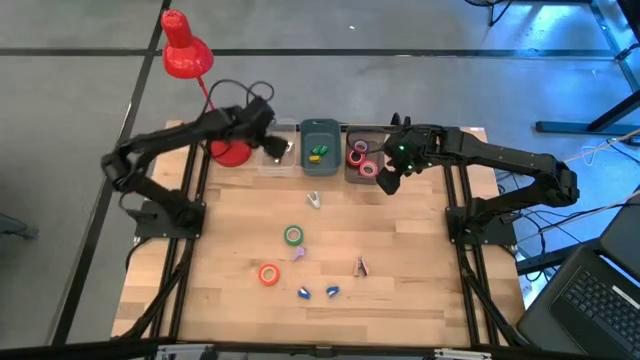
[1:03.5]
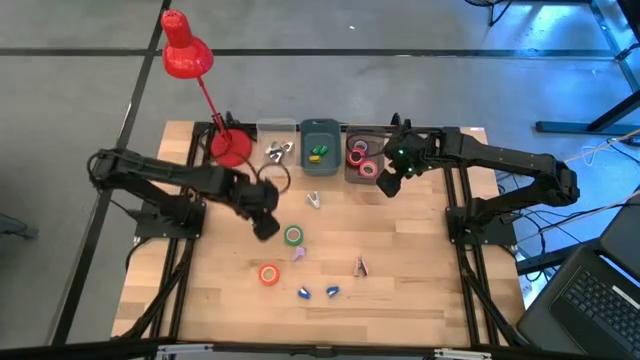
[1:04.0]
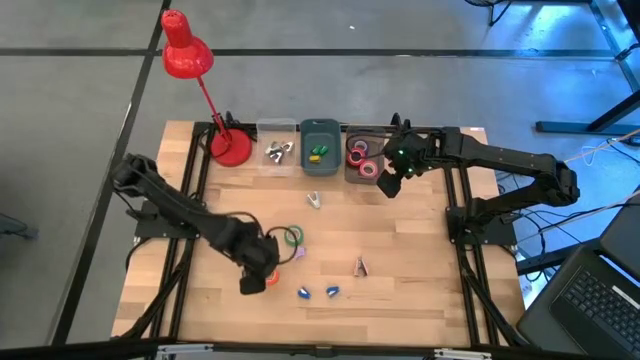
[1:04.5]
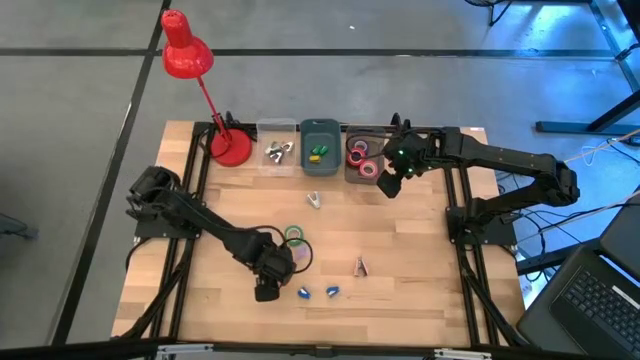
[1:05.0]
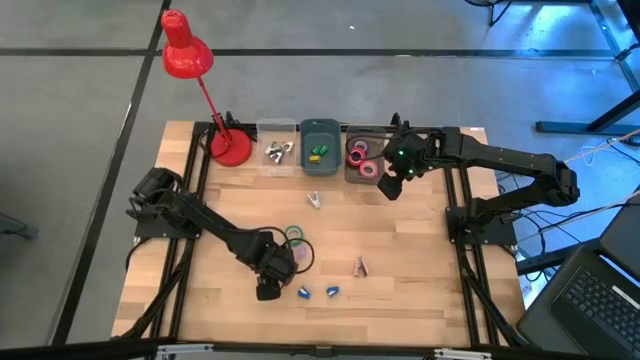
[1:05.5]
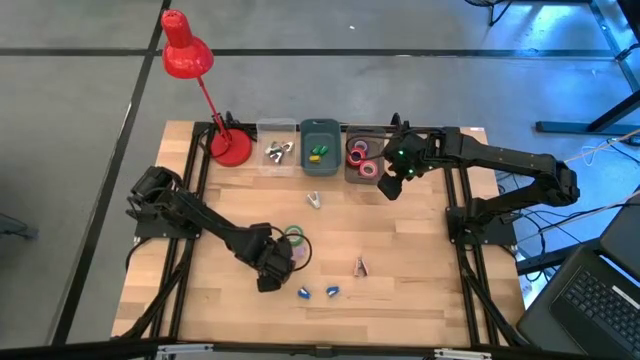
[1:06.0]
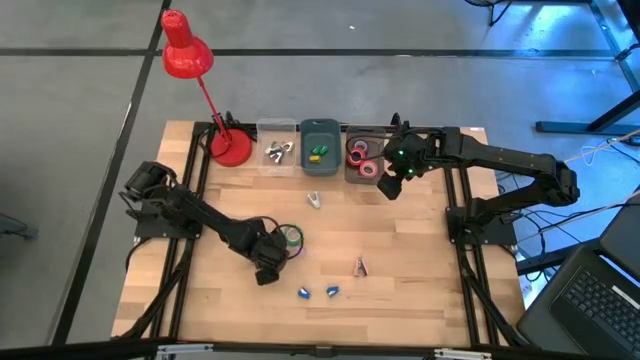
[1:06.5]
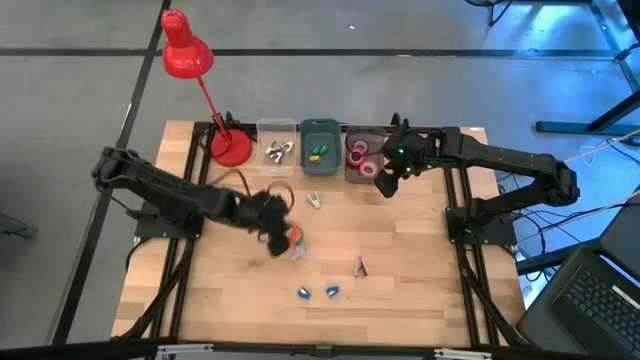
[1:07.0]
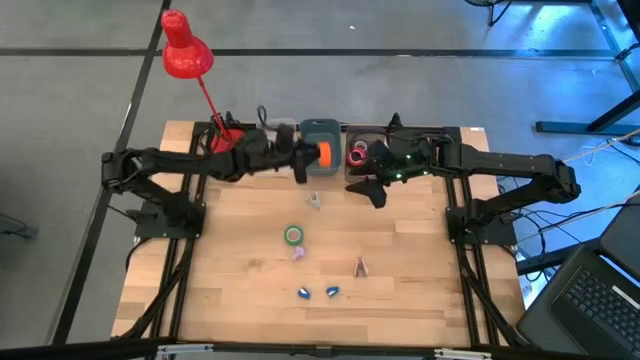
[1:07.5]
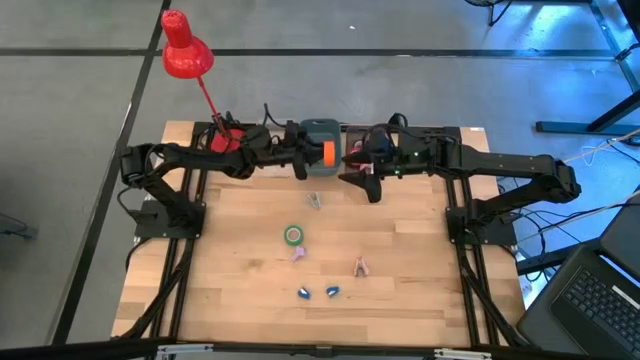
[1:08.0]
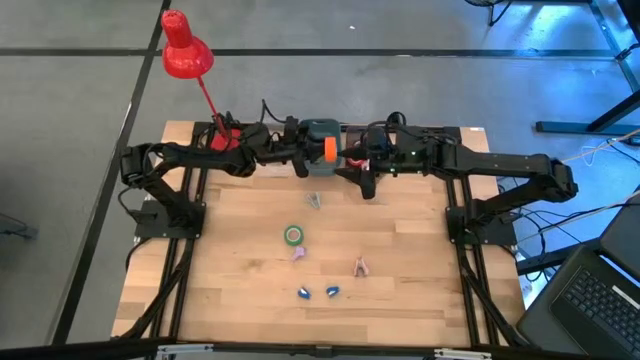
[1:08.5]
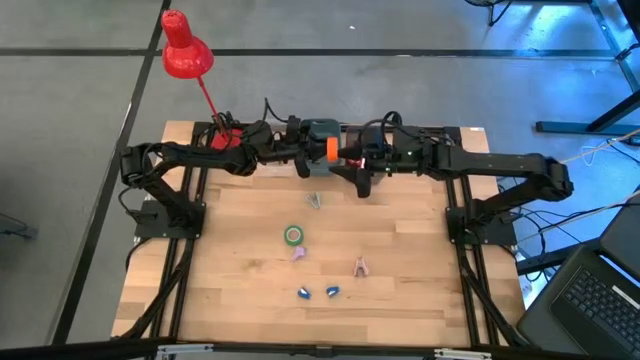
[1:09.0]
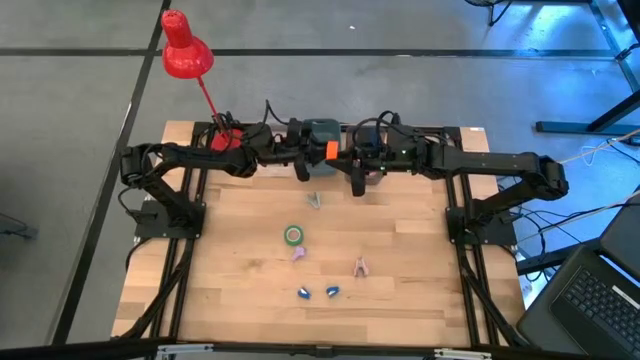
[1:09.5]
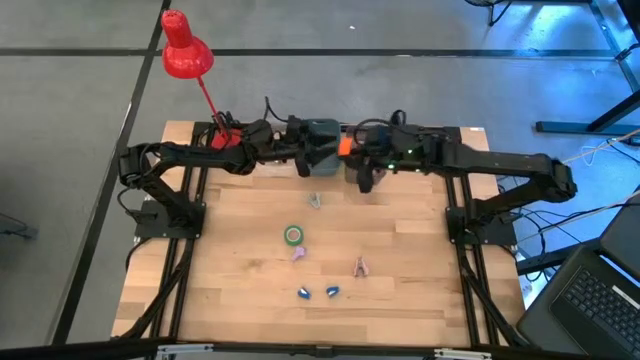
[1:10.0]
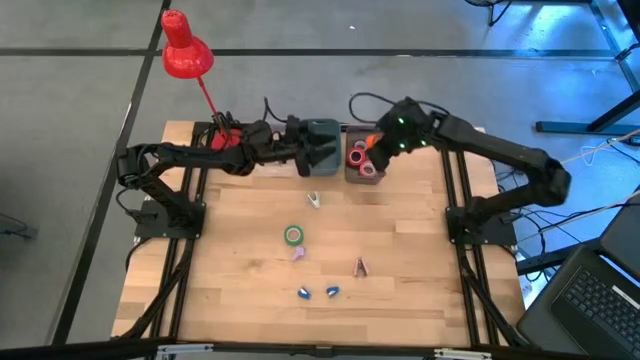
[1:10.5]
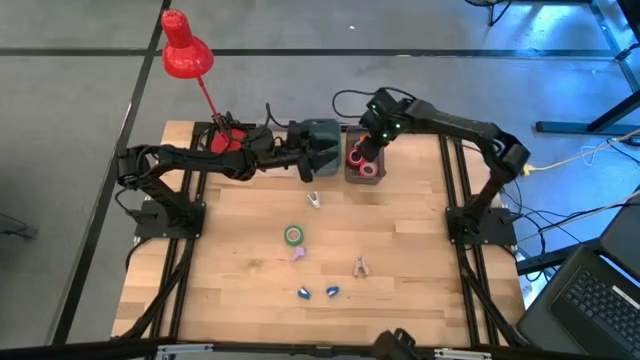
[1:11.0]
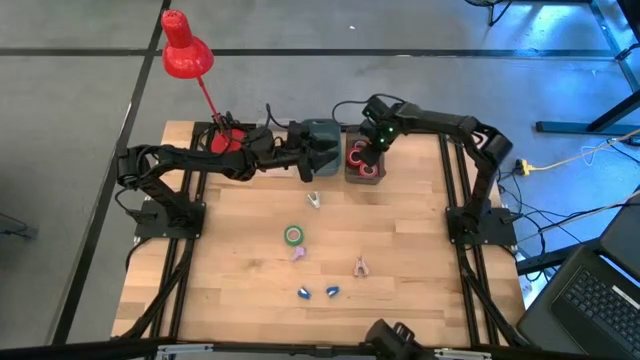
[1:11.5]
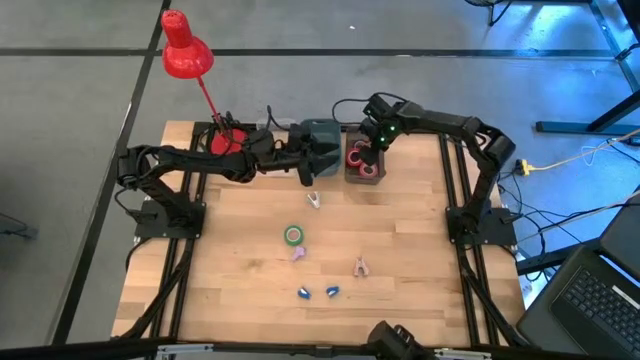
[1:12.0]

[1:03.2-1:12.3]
Task: Pick and place Stapler, Stapler remover, tape
Put the orange tape into the black bin

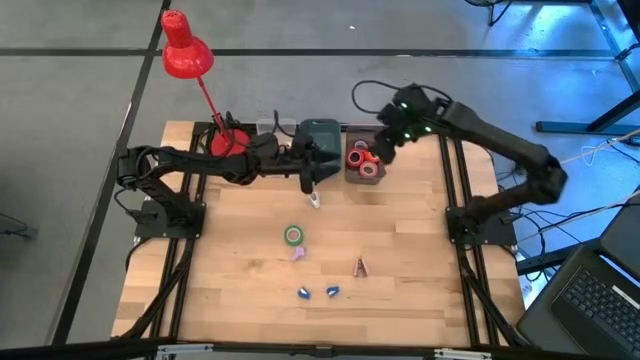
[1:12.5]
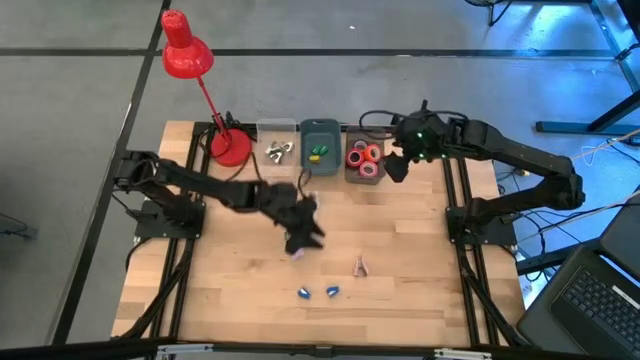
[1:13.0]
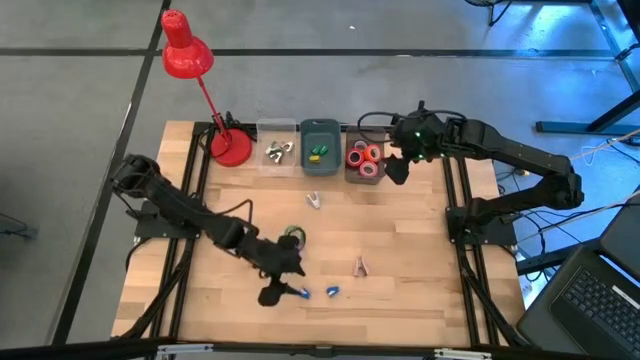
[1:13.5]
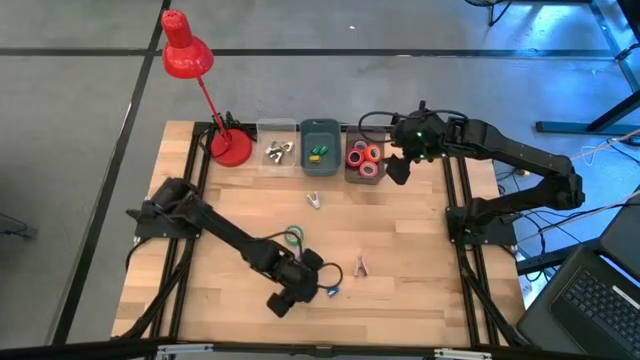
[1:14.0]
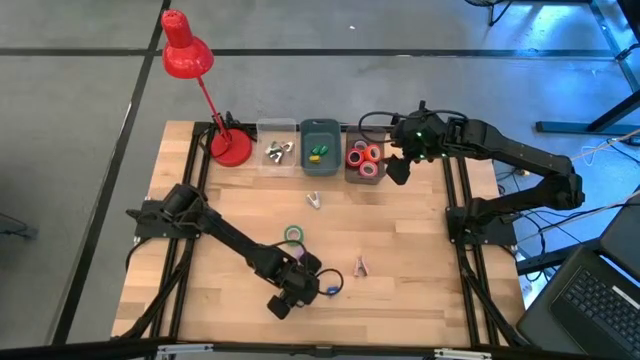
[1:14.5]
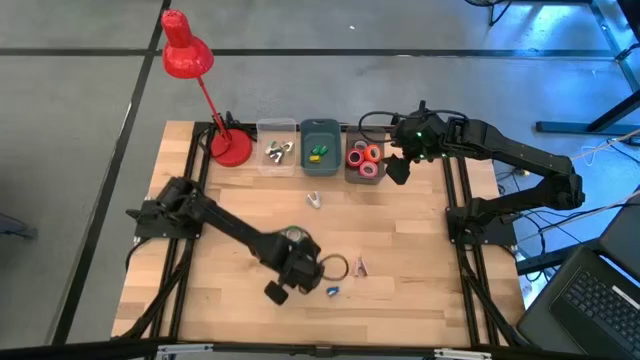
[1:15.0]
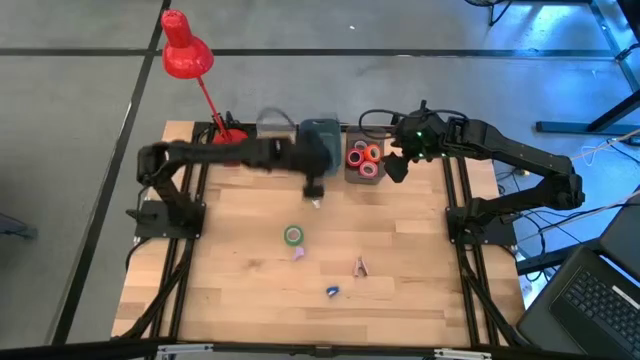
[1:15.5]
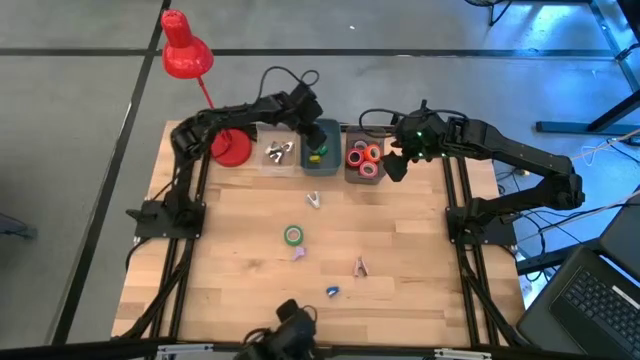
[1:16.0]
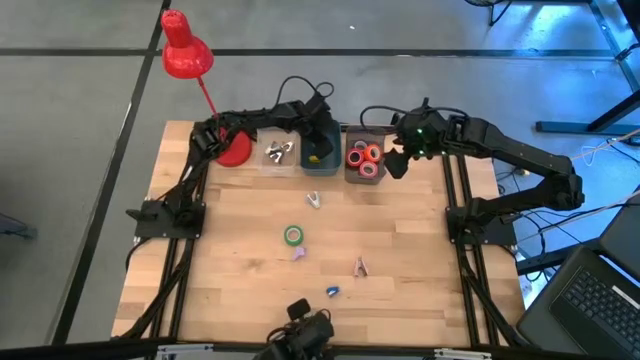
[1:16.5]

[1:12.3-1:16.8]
Put the left blue stapler into the blue bin

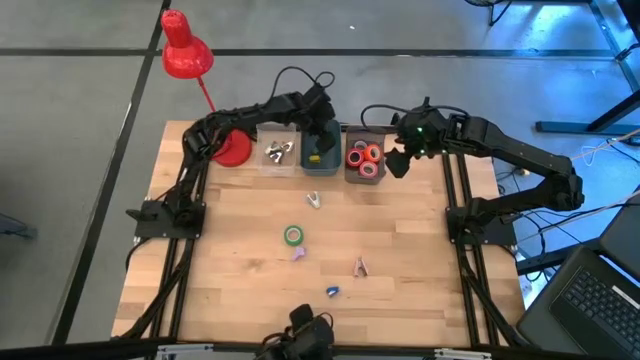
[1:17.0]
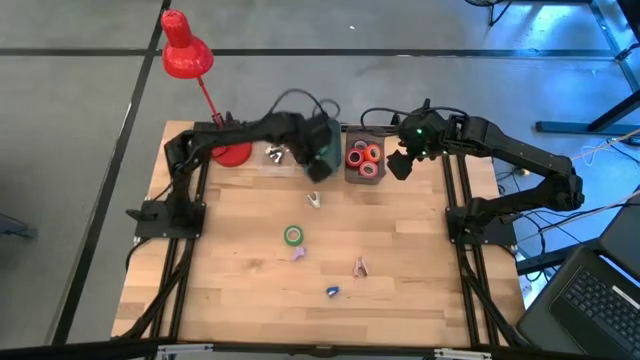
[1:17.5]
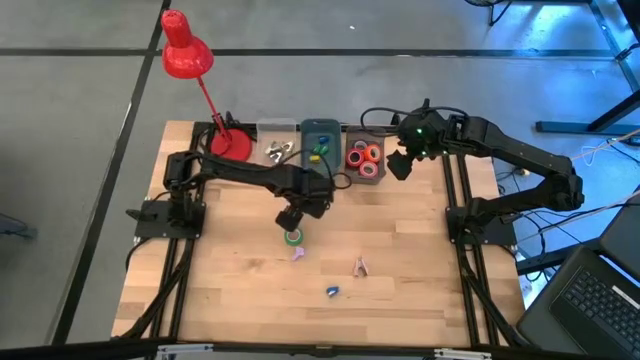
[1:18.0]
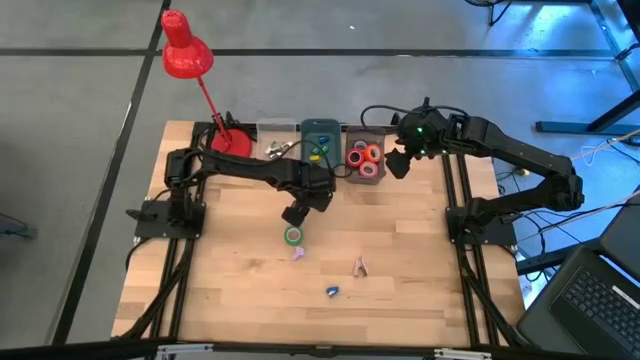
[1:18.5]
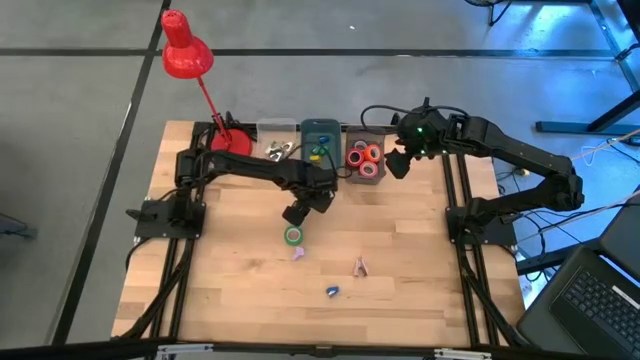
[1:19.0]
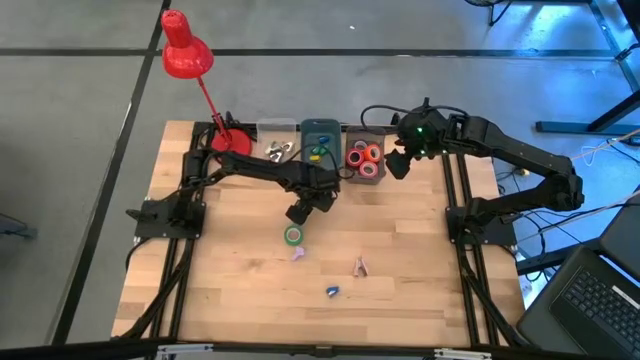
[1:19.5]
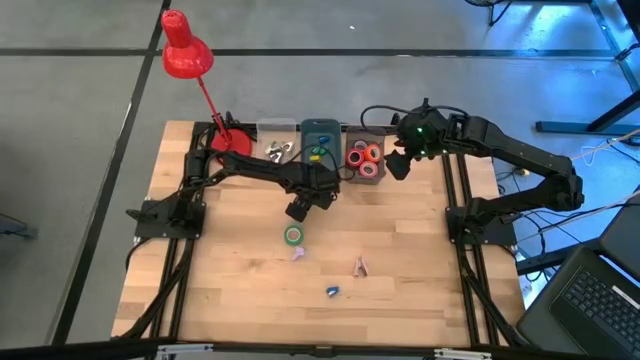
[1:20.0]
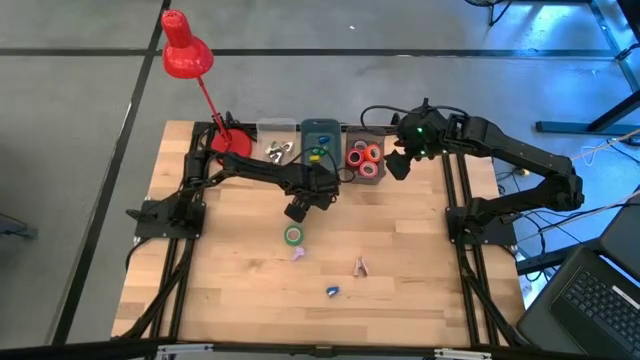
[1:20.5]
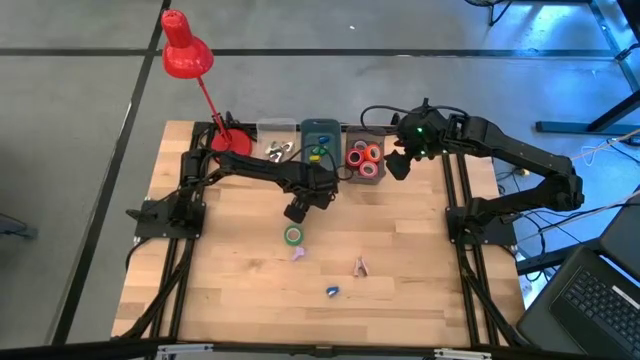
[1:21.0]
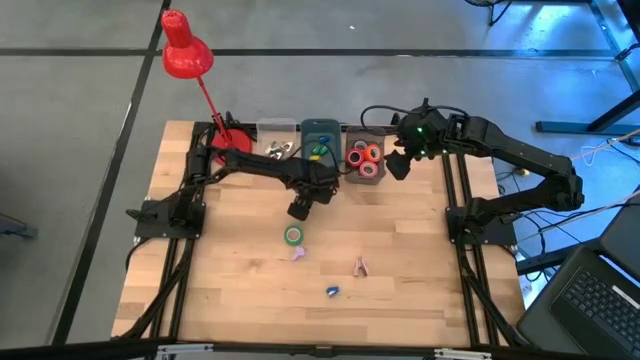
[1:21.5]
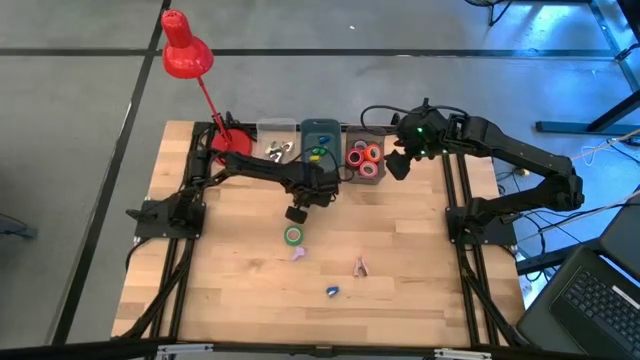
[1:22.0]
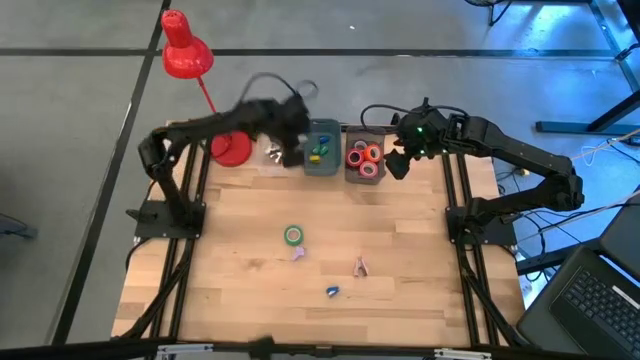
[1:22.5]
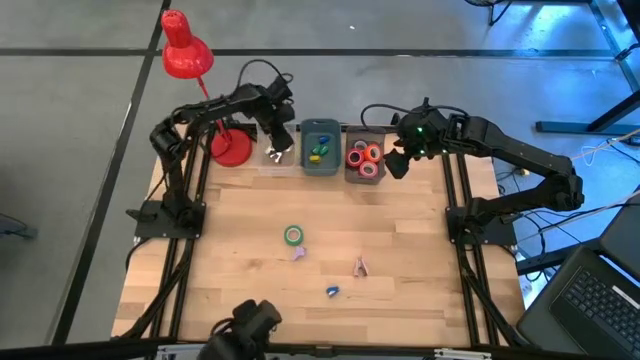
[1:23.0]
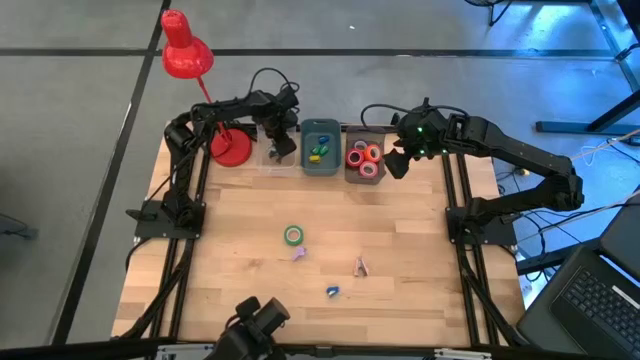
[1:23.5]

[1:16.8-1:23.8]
Put the light blue staple remover into the transparent bin

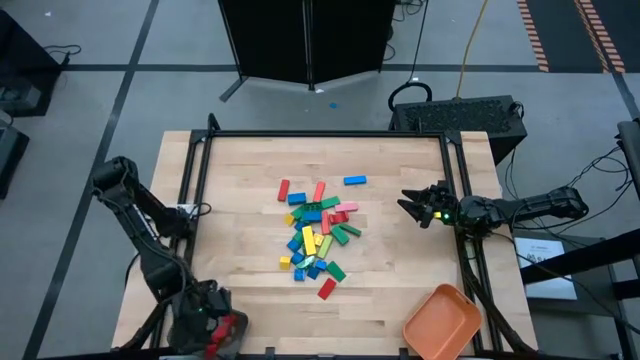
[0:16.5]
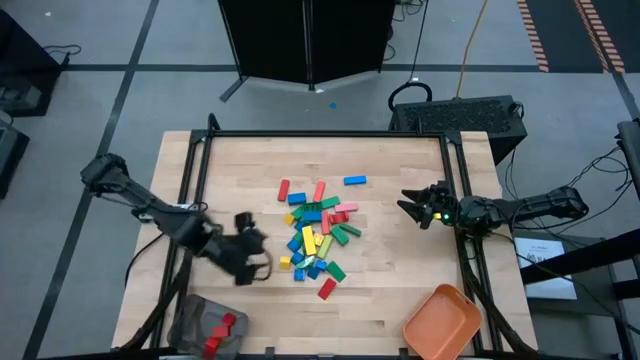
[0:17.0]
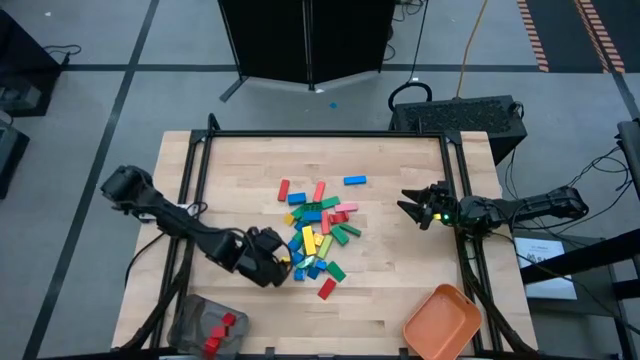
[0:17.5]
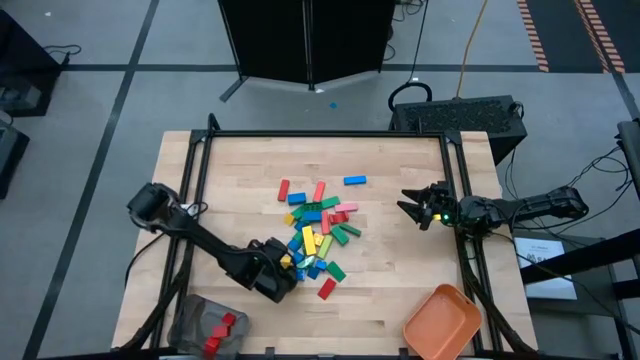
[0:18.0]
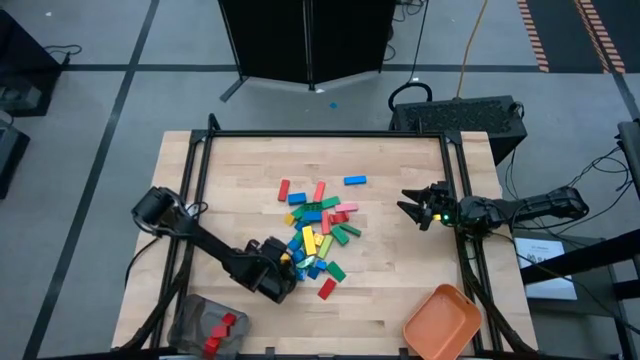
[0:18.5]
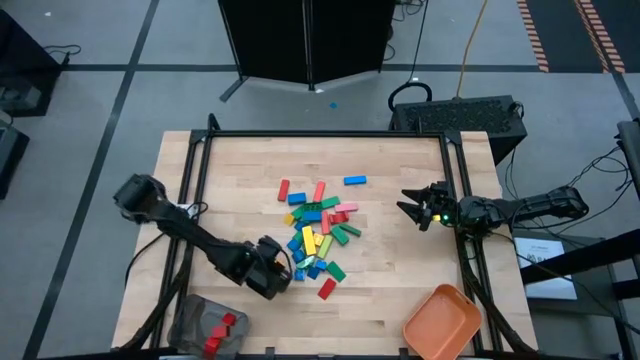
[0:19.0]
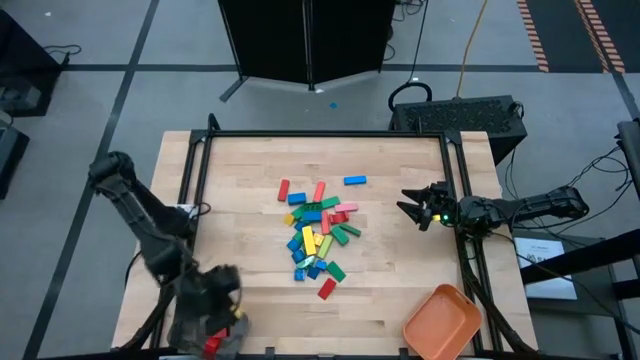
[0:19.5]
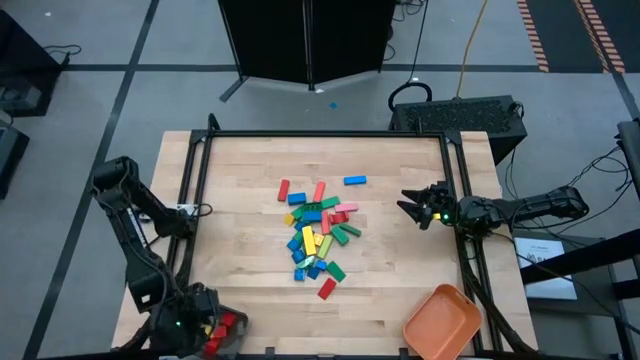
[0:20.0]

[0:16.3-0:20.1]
Task: Sort blocks by size
Put the yellow triangular block into the black bin
